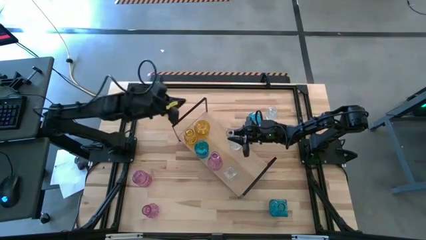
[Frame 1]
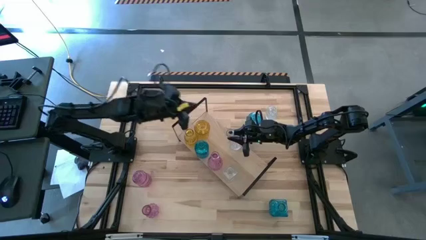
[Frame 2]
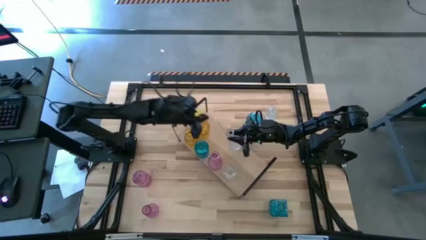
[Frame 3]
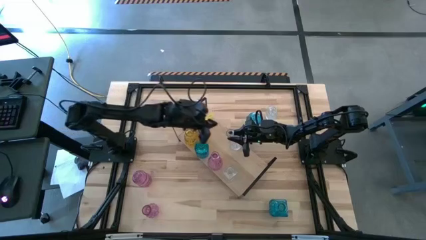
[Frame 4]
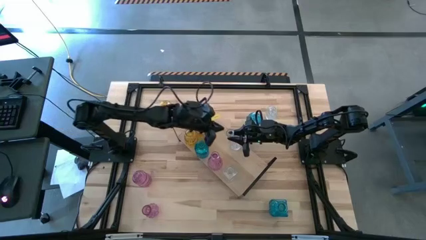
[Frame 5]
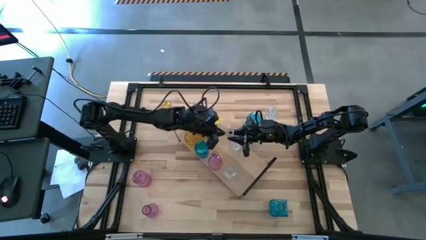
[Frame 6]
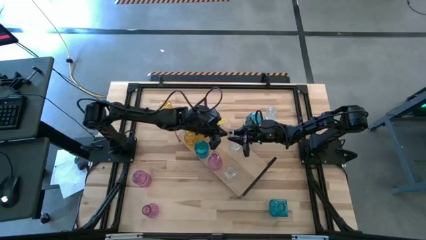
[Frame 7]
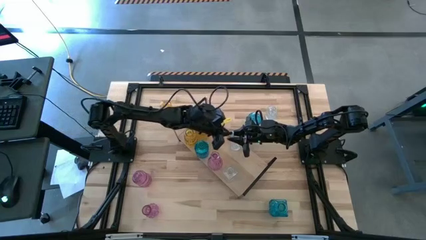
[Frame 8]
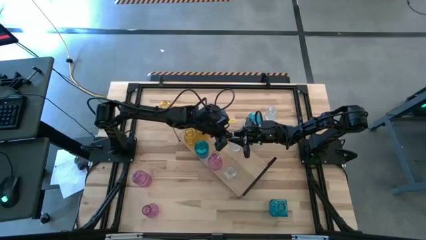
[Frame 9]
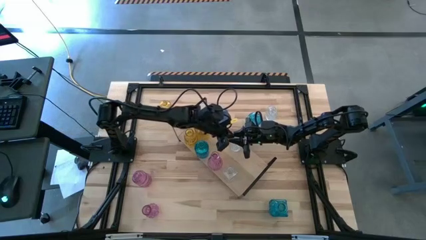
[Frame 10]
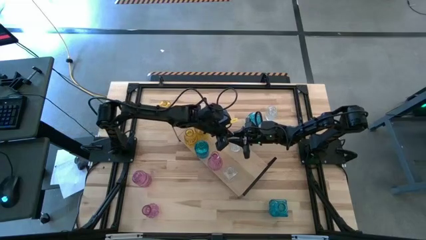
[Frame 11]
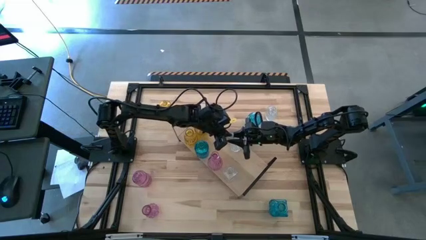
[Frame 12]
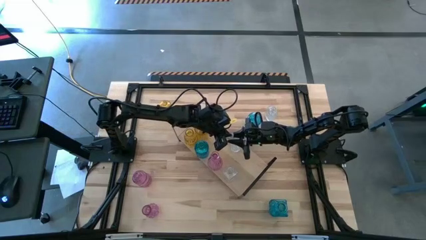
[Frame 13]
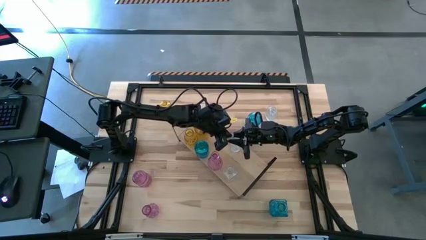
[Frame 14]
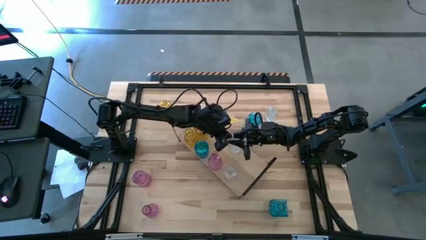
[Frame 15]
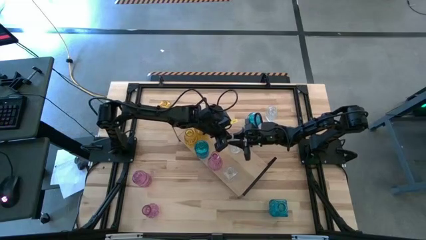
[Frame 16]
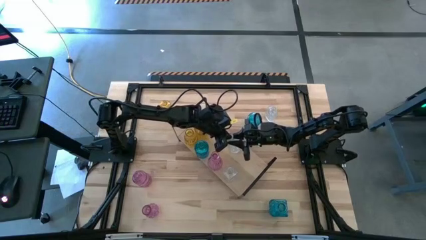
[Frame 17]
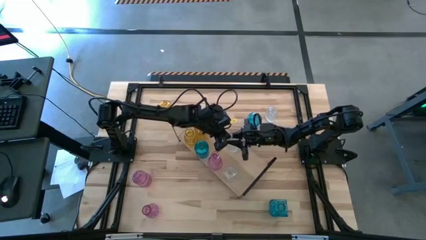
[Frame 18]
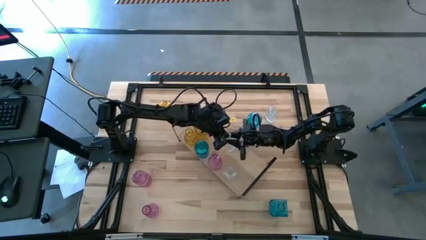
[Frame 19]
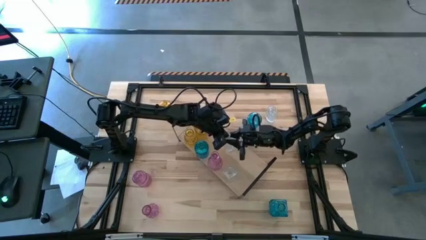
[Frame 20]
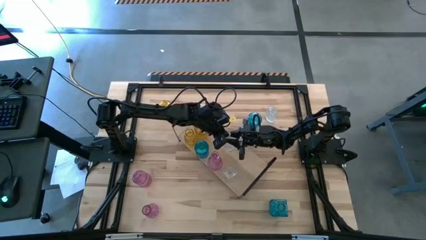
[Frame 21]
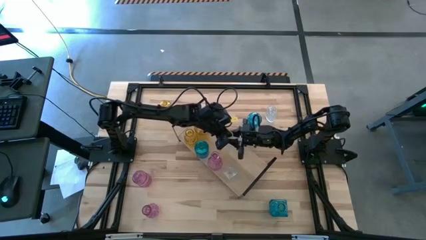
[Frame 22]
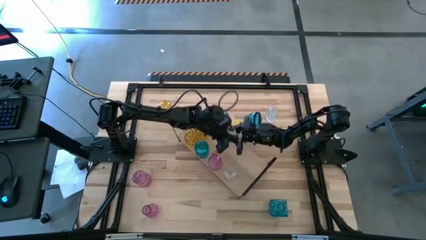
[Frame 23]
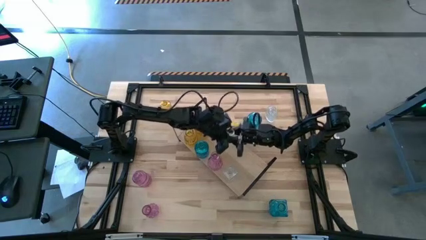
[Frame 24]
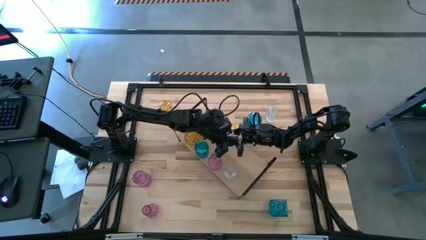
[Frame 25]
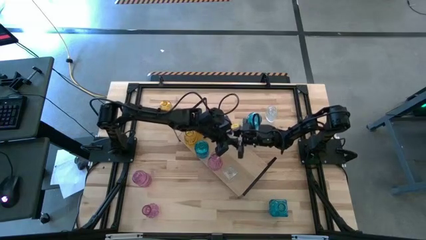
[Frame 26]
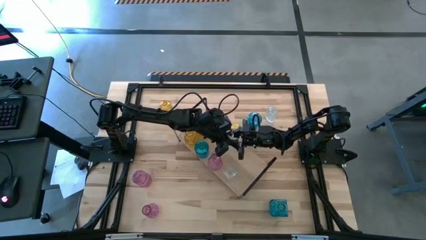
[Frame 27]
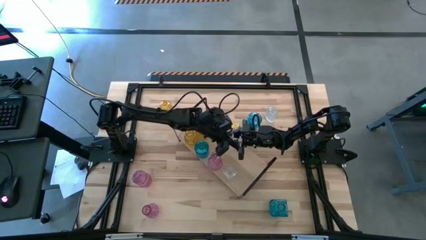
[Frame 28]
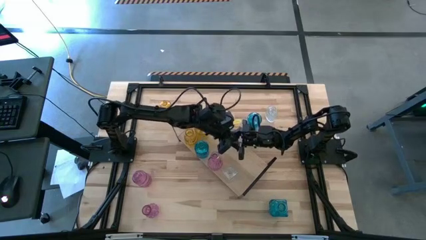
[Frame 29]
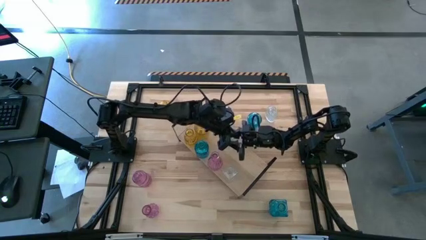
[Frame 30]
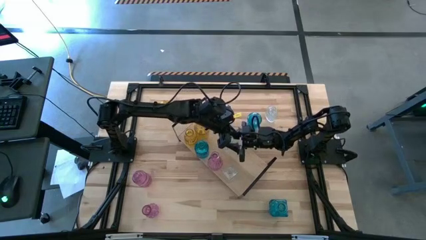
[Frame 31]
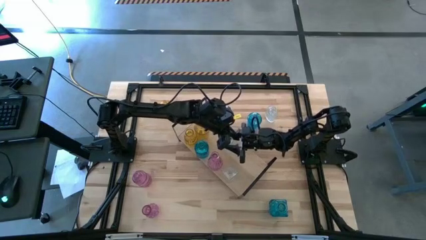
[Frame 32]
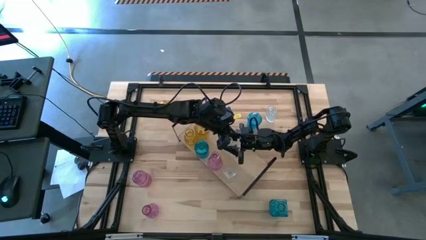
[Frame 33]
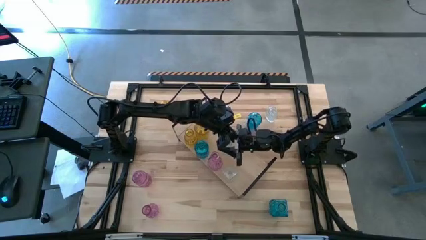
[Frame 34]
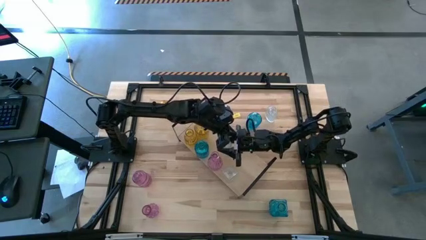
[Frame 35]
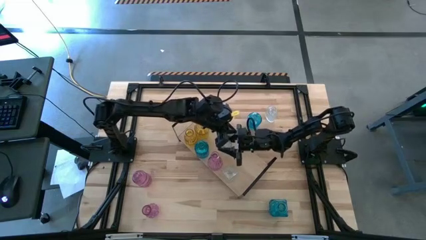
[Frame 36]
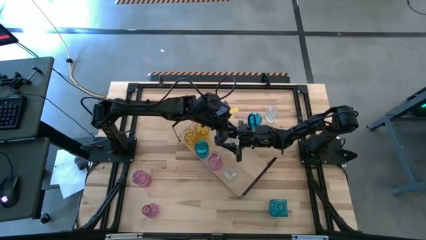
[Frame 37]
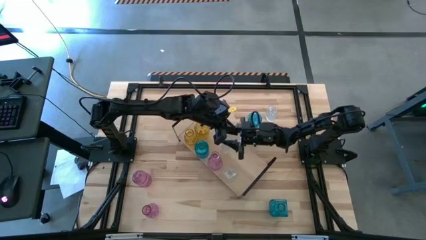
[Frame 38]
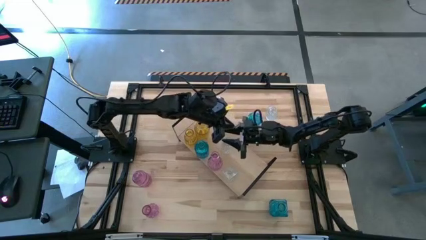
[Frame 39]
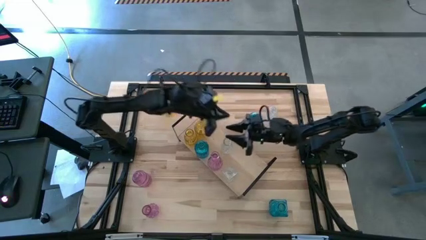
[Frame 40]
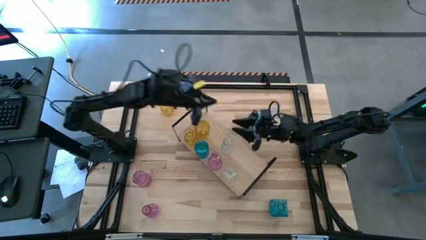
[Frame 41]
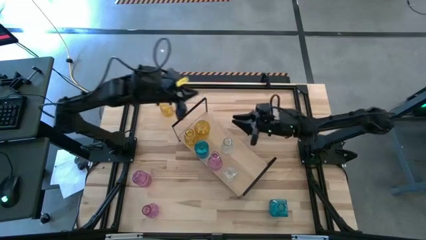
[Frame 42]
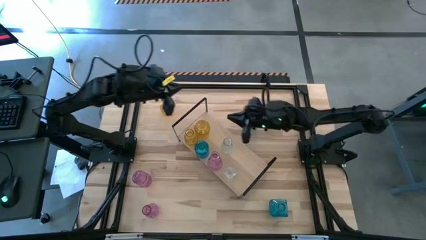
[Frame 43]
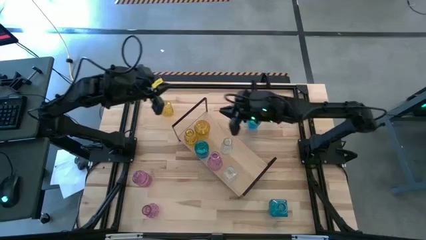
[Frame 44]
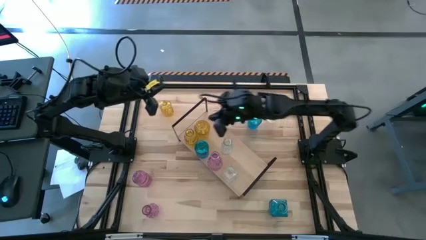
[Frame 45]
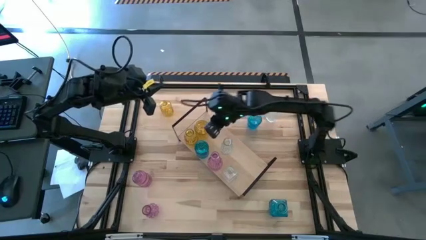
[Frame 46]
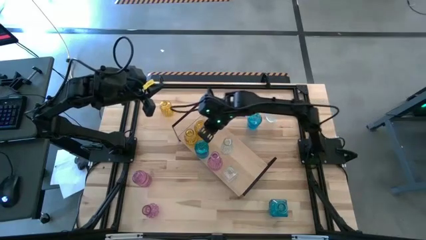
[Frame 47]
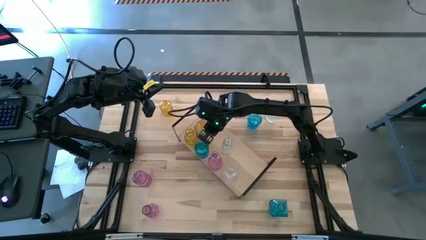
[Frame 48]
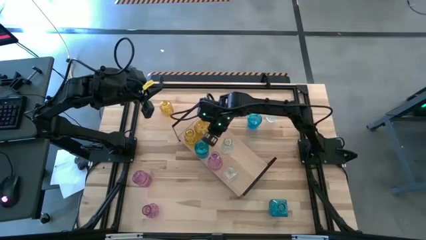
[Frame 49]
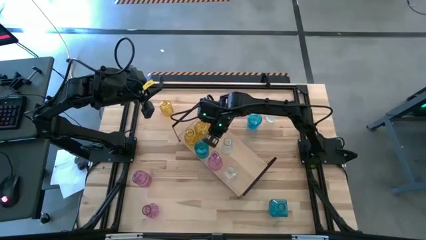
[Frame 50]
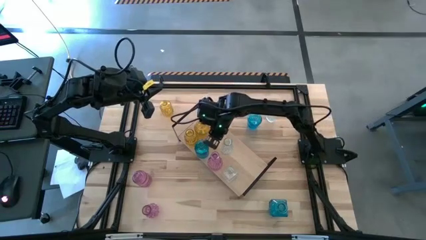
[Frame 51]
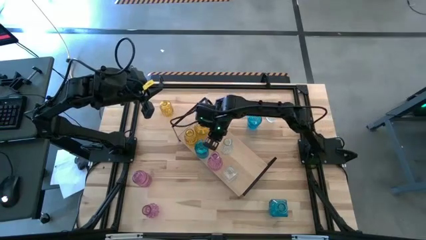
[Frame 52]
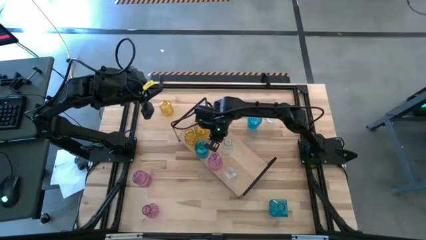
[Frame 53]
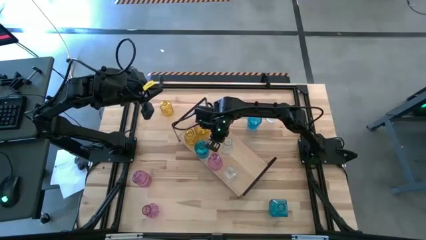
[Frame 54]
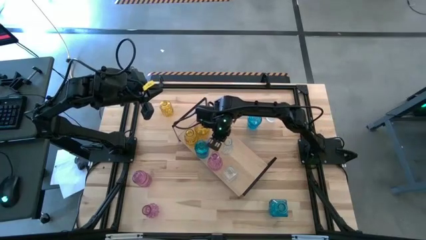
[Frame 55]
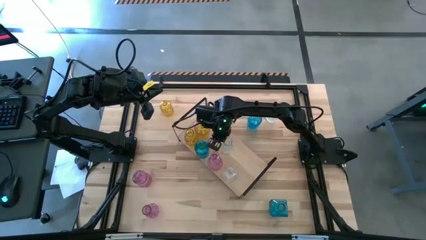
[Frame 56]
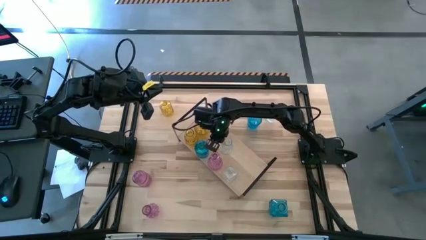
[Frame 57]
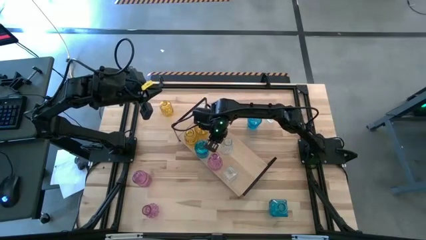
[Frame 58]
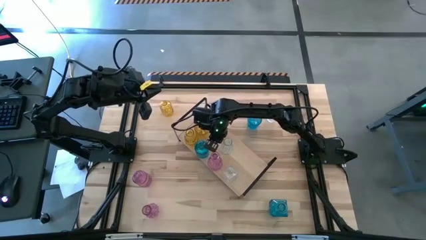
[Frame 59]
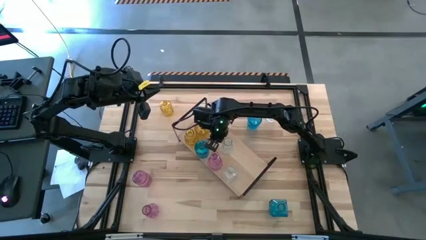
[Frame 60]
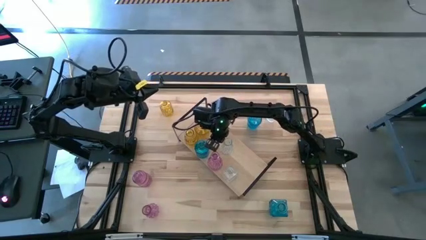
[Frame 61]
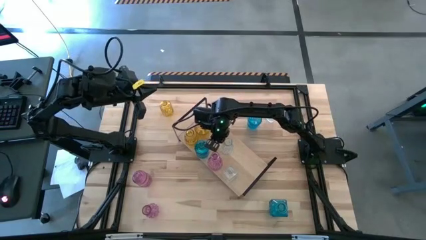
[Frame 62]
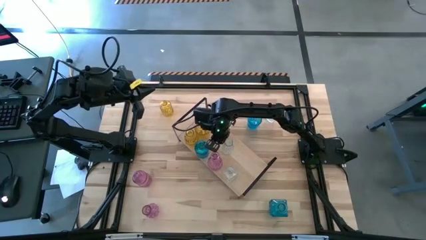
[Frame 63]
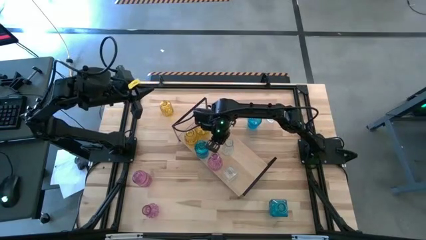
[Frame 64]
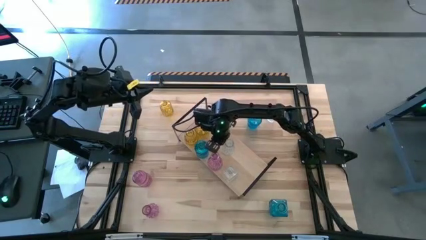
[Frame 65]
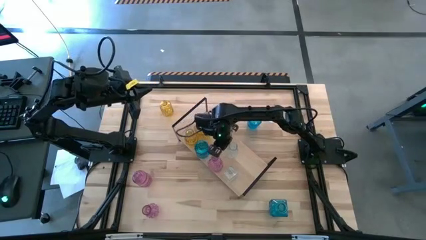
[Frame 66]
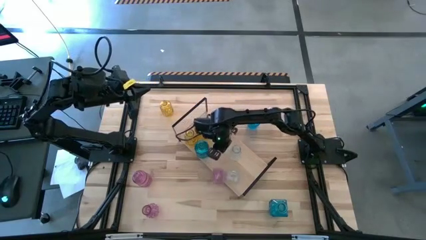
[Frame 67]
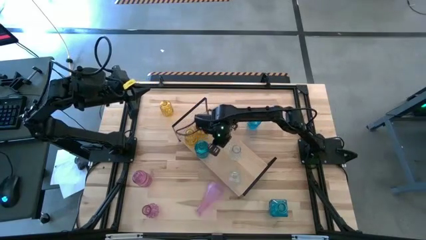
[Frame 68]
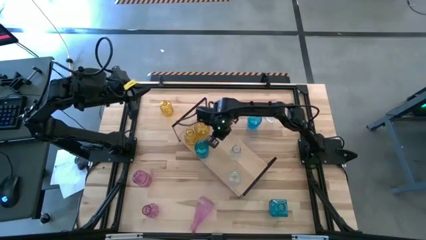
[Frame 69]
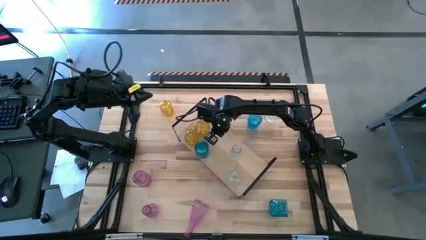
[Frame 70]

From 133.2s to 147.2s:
Task: sort vases onto shelf
Put the left crystal vase on the shelf
